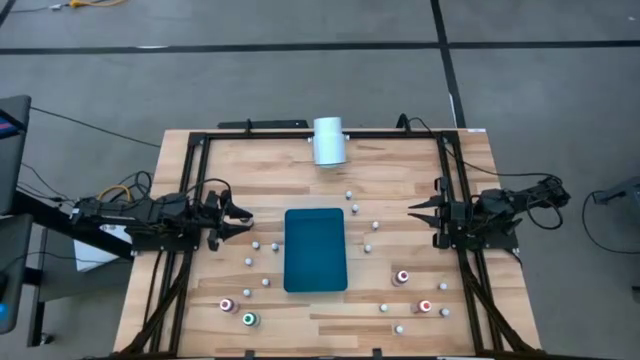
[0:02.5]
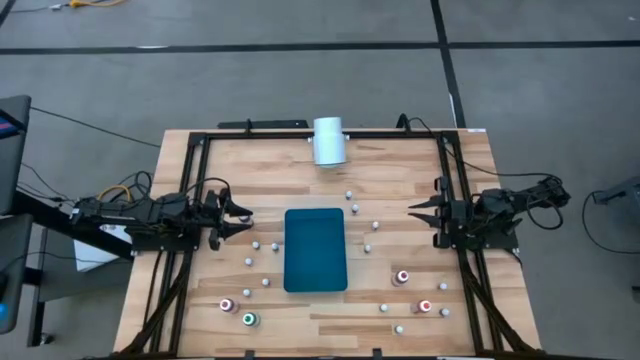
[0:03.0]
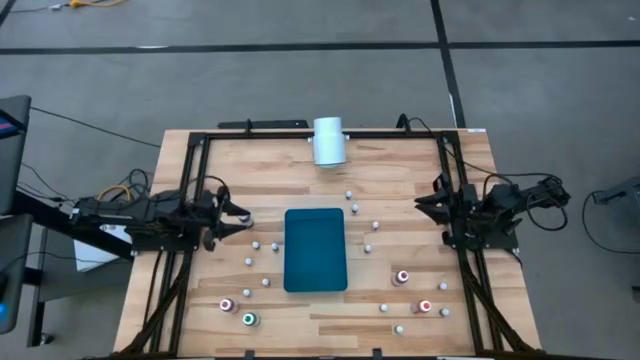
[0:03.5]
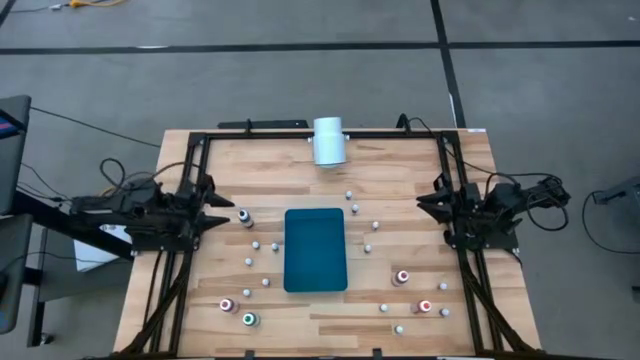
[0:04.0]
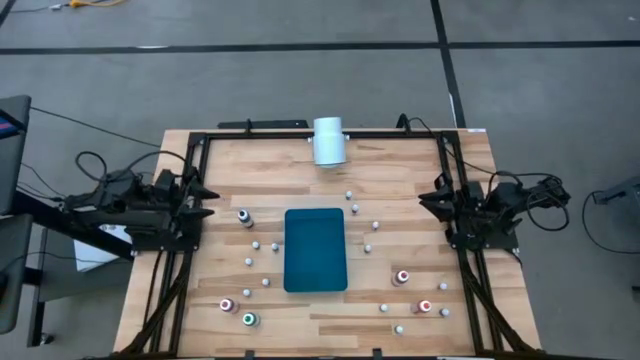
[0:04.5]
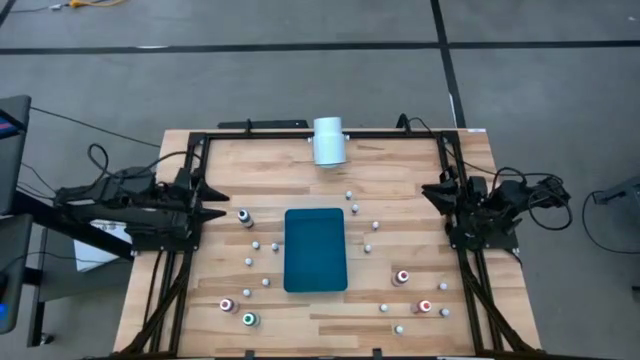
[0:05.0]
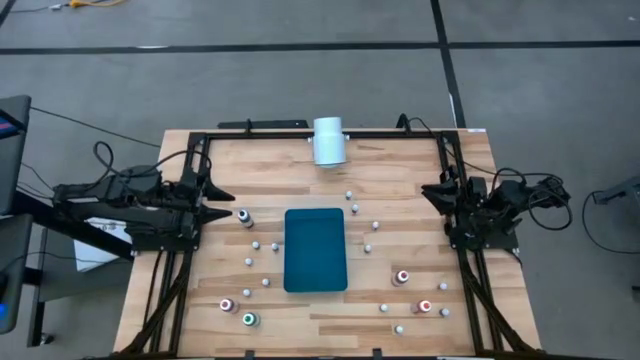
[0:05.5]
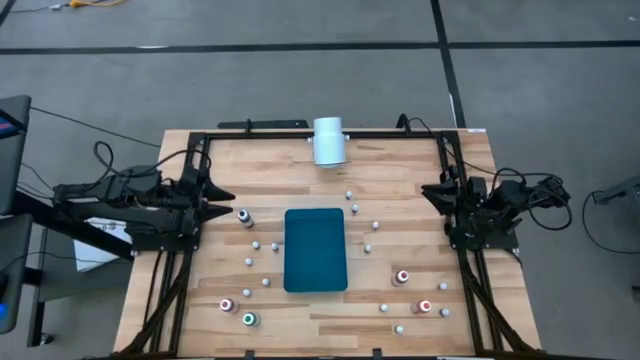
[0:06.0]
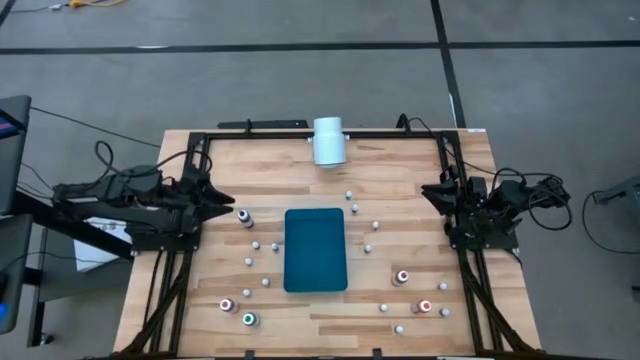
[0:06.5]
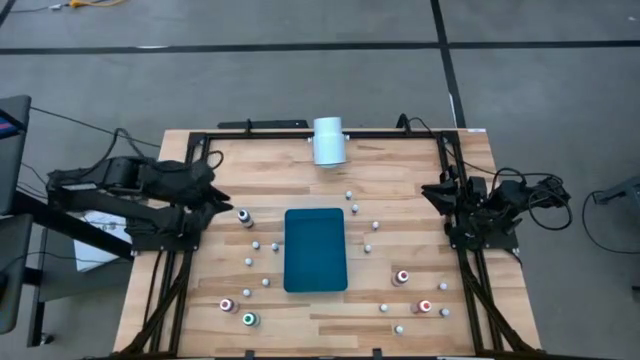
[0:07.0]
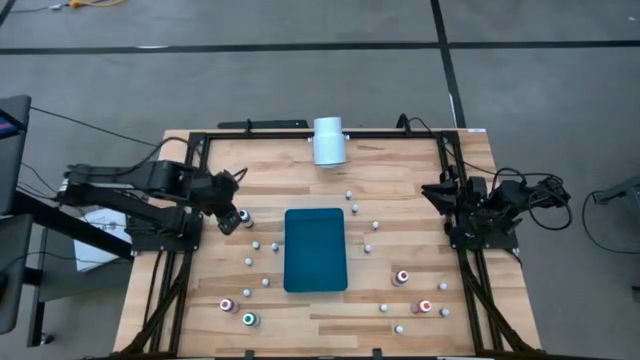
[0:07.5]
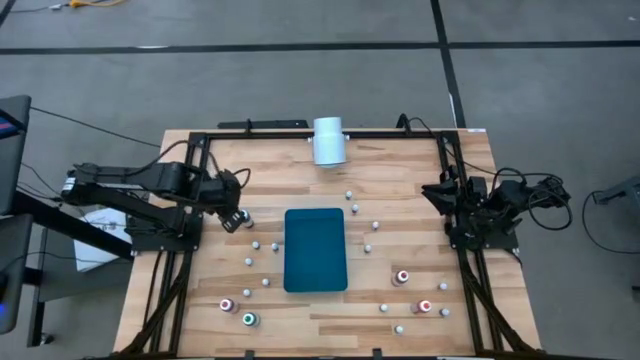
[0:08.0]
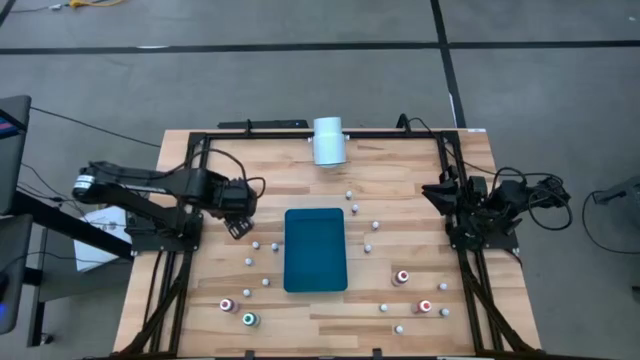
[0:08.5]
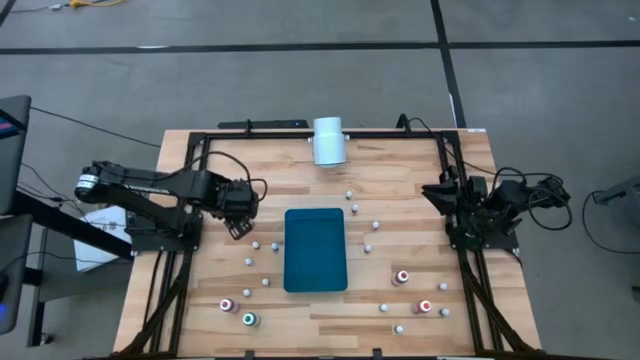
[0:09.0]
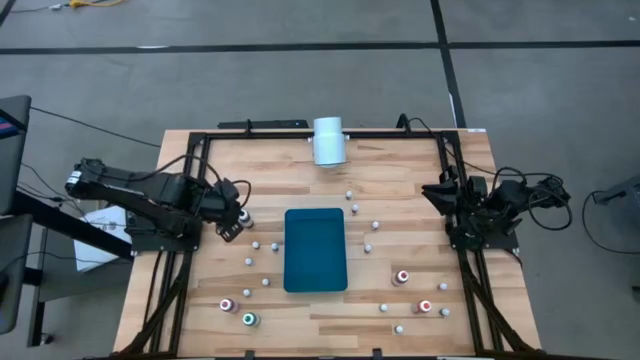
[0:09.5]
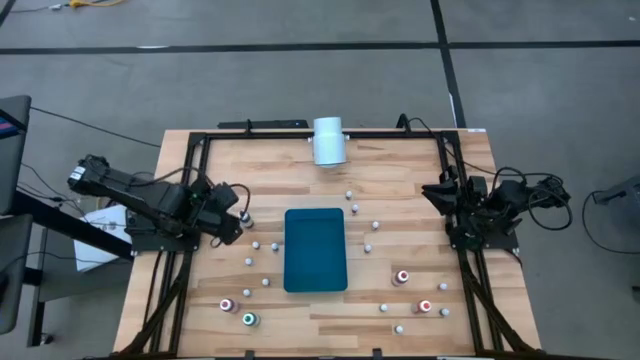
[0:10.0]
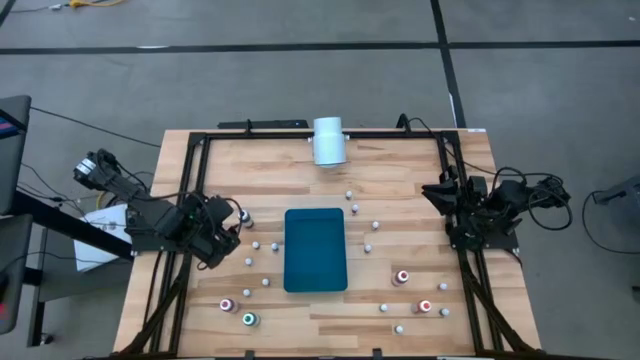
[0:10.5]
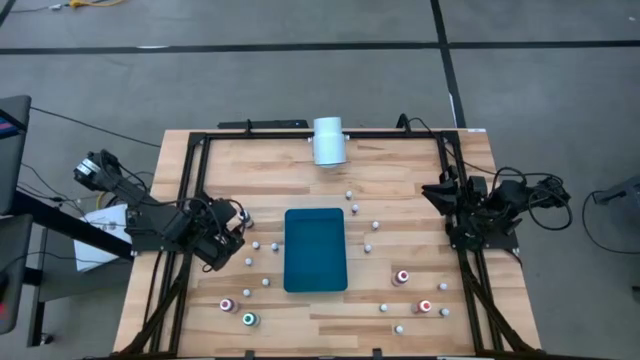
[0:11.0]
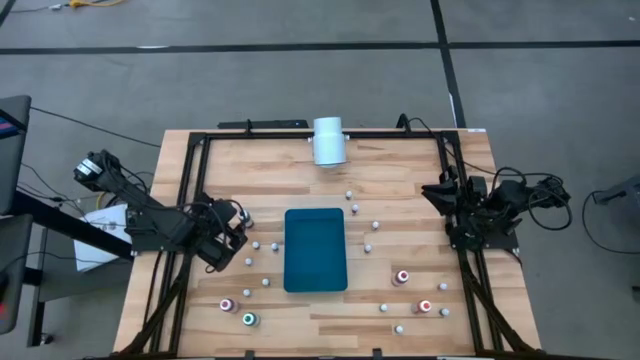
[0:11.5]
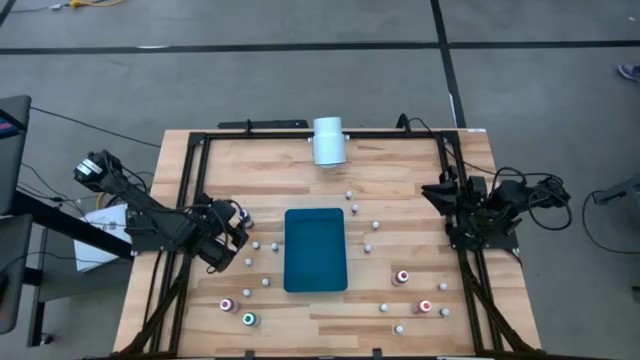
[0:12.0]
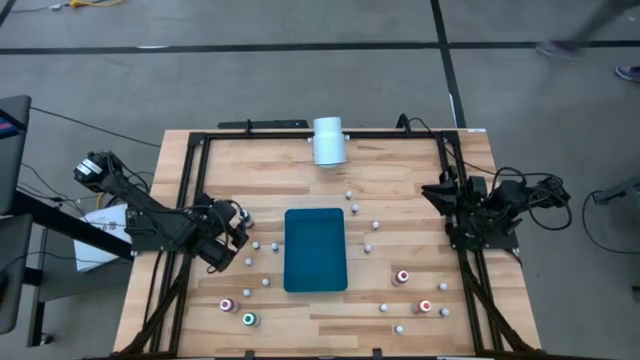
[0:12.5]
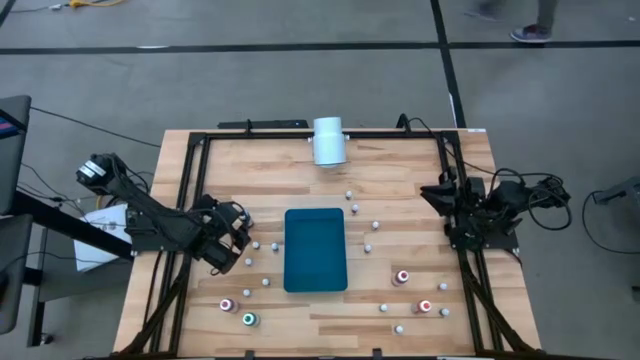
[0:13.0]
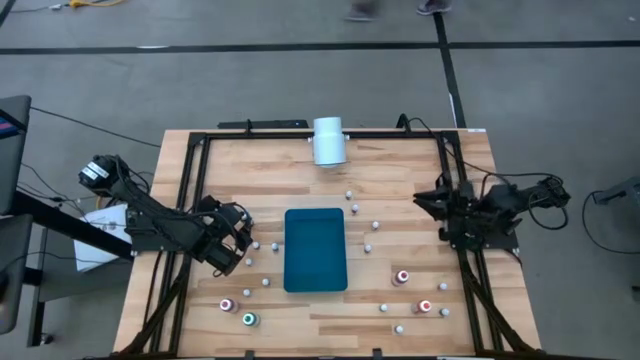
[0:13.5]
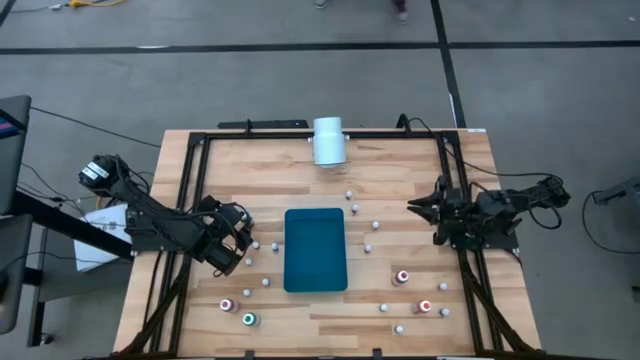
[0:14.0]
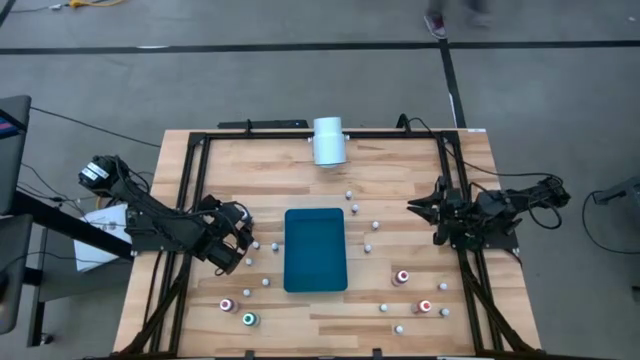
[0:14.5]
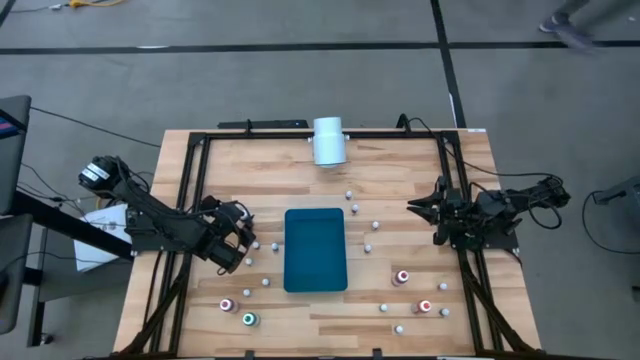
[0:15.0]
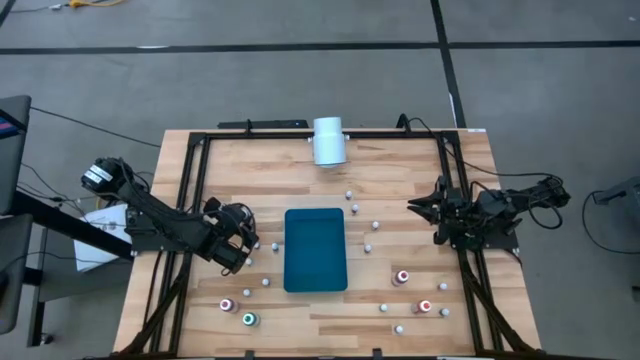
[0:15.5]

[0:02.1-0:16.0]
Task: Pick & Place food coloring
Put the big black food coloring bottle into the blue bin

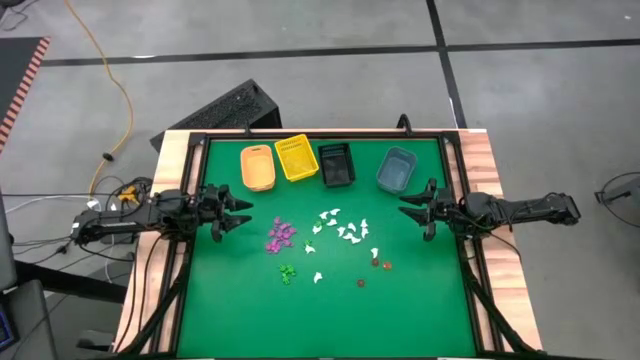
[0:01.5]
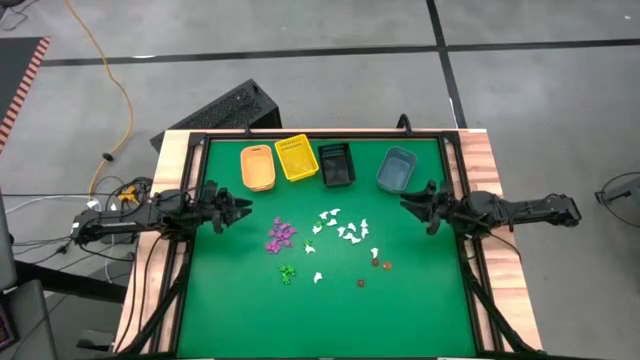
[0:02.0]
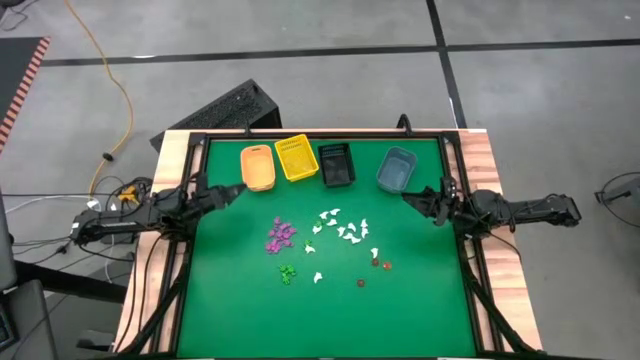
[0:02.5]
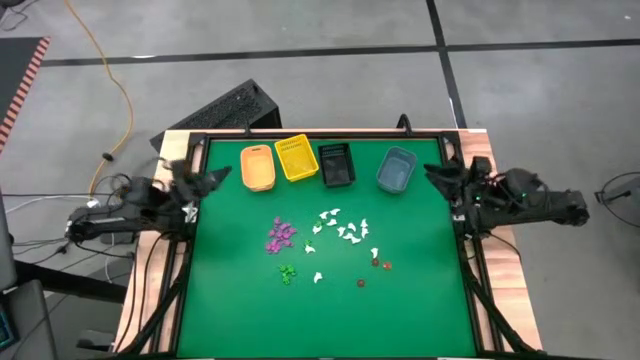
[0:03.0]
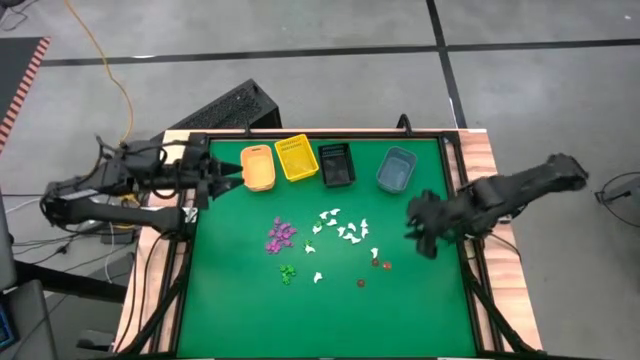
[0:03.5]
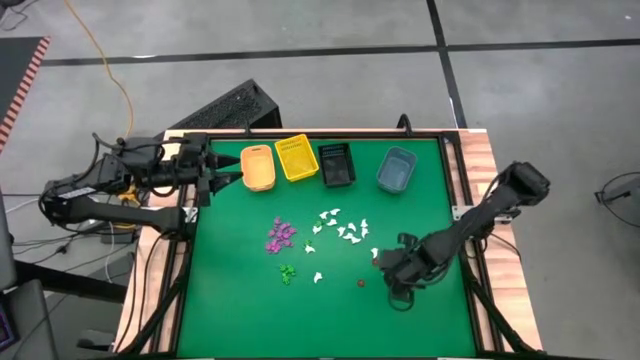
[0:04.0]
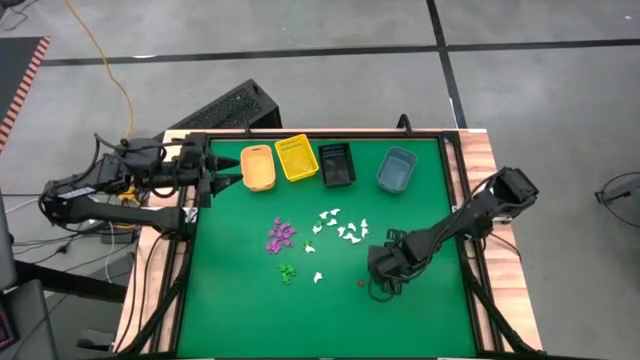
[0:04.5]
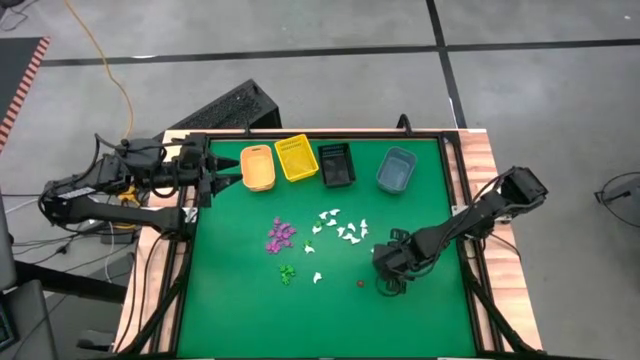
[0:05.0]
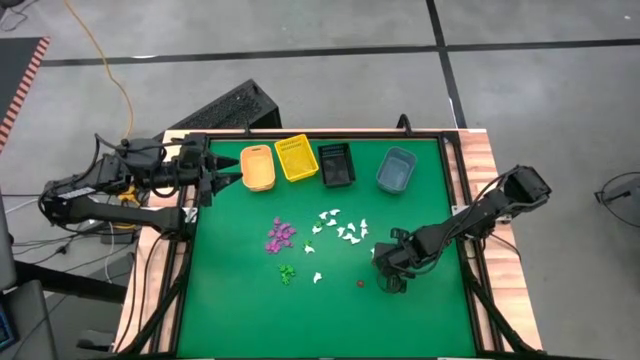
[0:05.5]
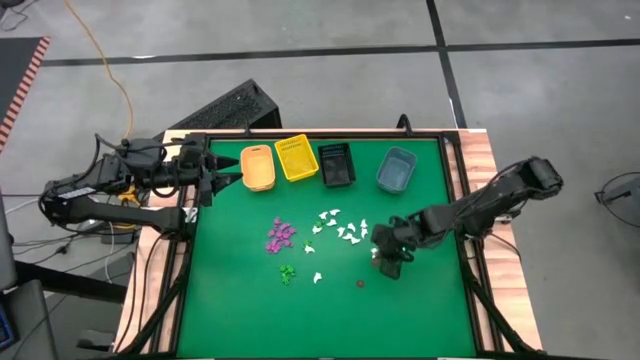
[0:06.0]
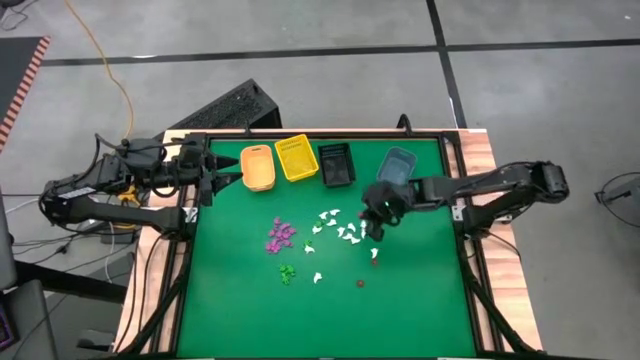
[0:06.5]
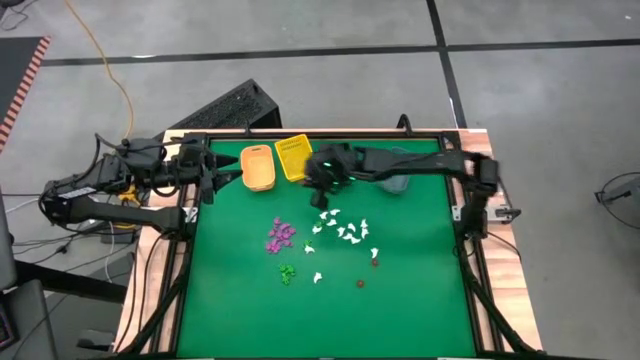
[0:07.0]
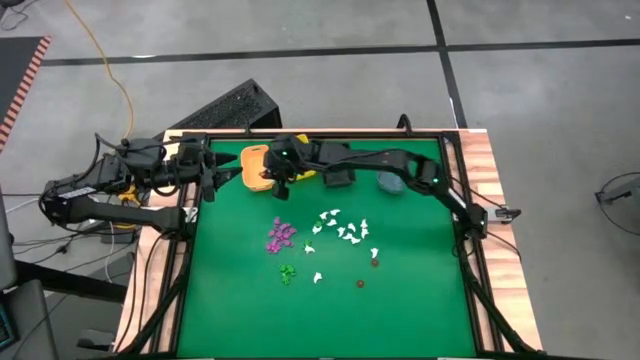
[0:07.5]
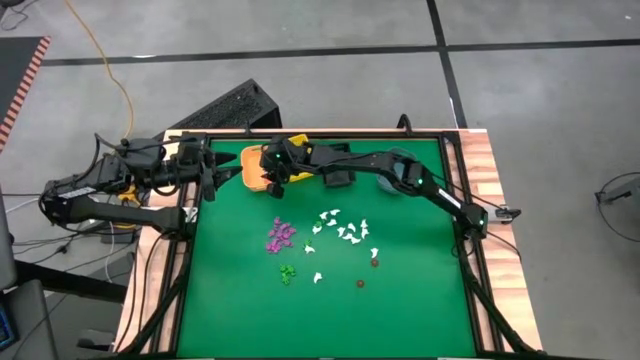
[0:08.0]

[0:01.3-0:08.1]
Task: Sort Halloween decoration
Put the orange pumpkin toy into the orange bin
